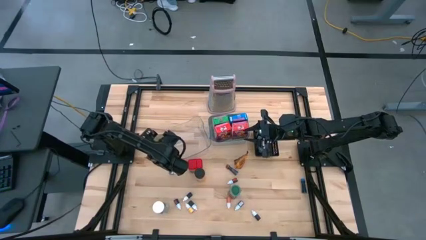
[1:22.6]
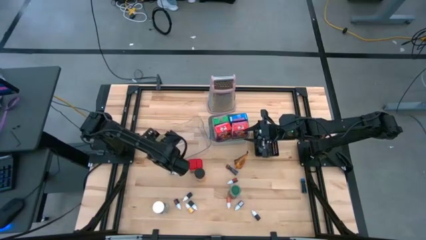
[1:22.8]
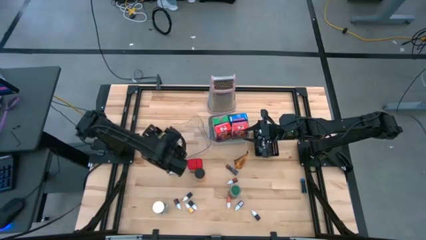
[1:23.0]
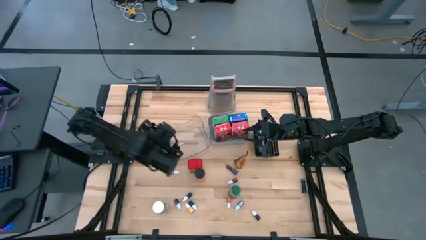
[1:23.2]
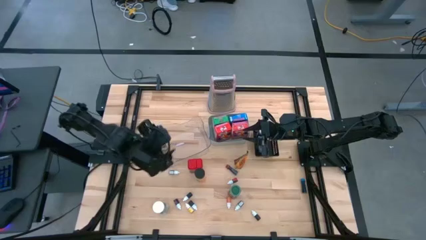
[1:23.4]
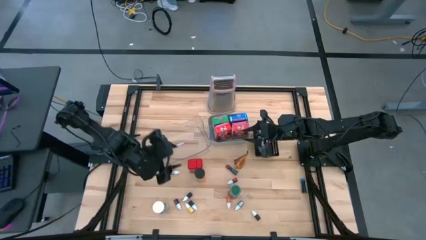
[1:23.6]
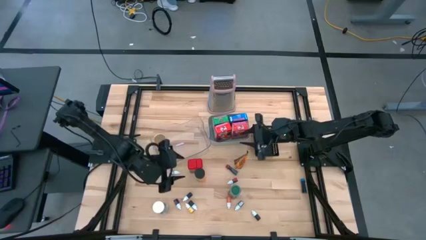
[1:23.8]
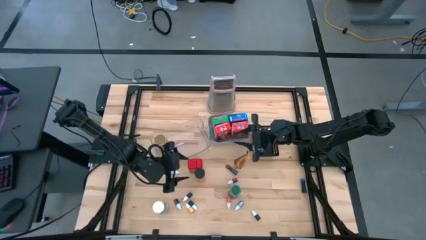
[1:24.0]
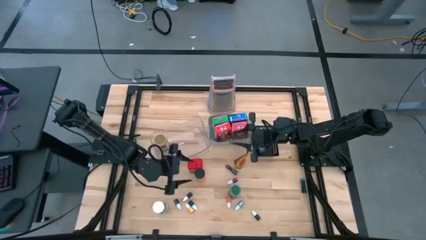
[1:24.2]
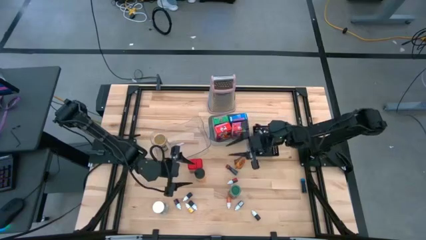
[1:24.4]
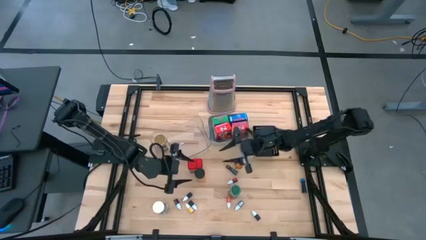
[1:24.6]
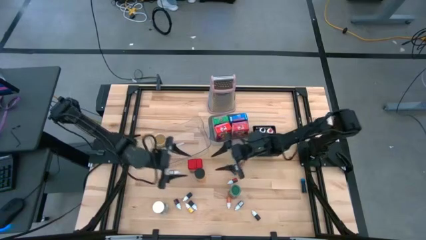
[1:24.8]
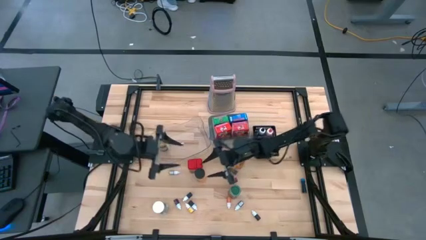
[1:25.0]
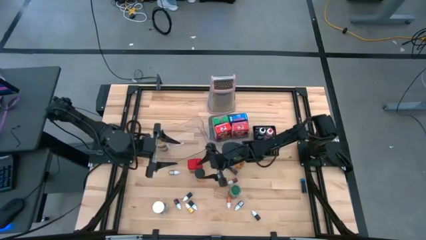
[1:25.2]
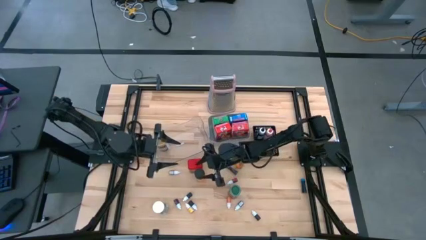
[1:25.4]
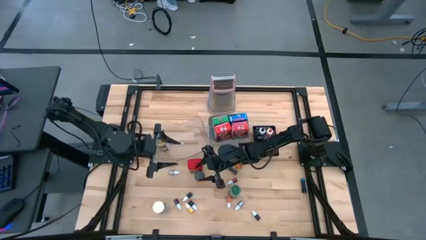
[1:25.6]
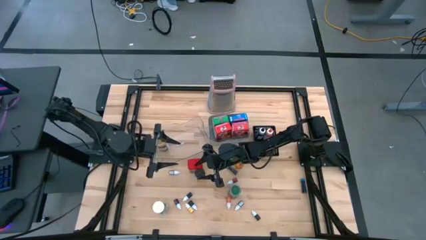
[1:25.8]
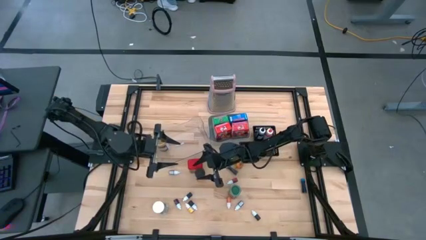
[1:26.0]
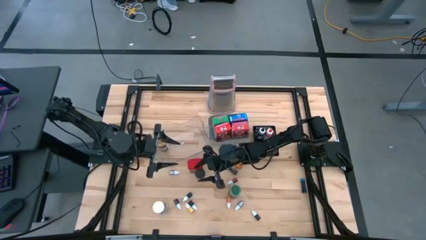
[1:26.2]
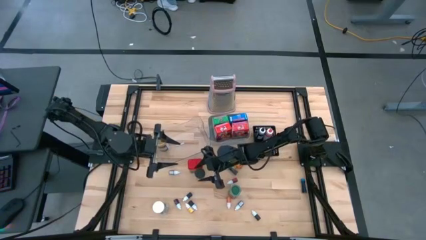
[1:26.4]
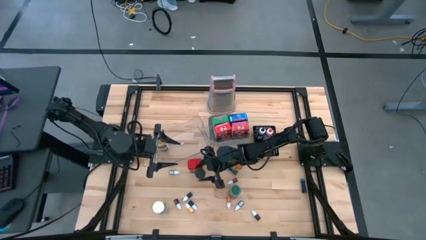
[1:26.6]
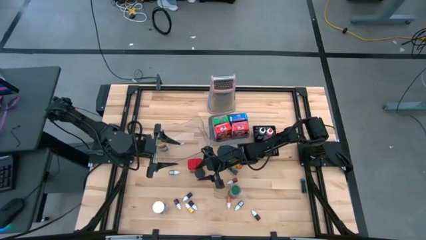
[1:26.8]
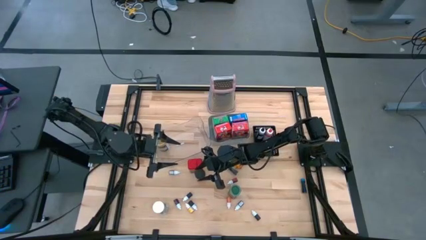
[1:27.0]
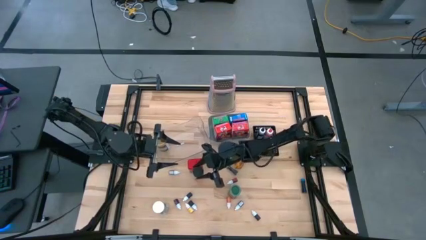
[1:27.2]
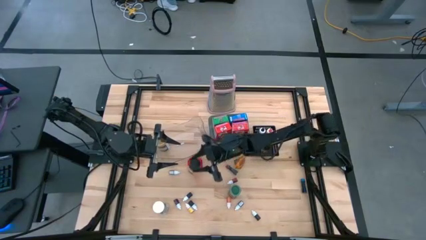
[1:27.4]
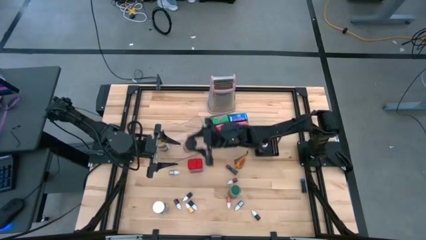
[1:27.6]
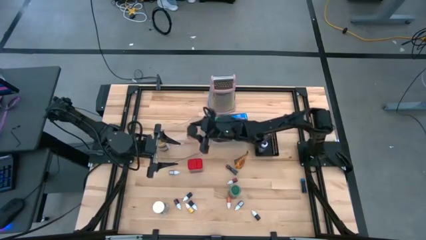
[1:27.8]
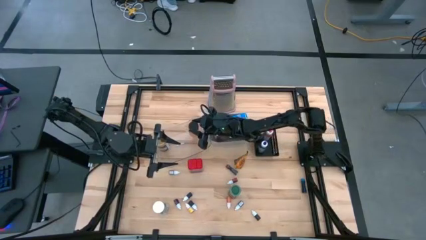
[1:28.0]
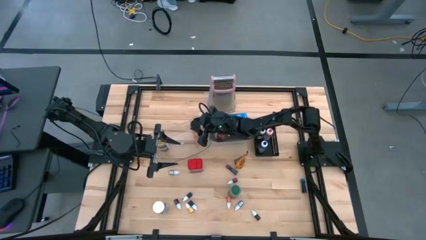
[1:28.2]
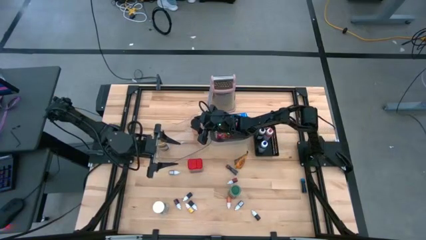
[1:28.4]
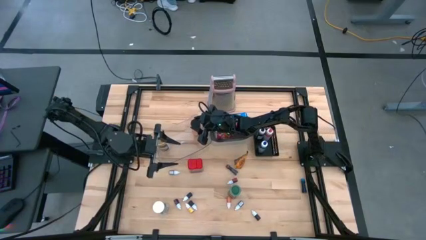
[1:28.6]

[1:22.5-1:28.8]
Task: Pick & Place Kitchen Items
Put the orange seasoning bottle into the transparent bin

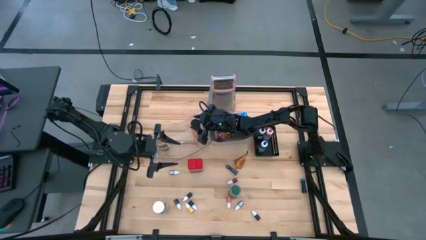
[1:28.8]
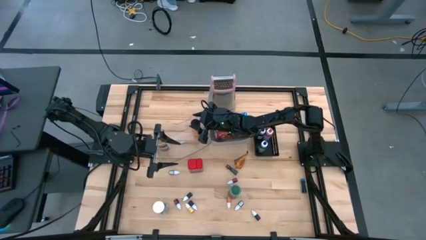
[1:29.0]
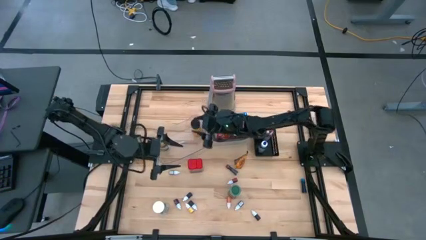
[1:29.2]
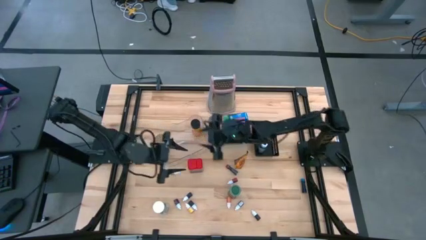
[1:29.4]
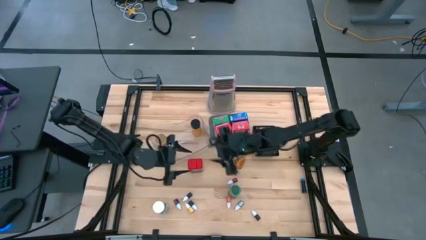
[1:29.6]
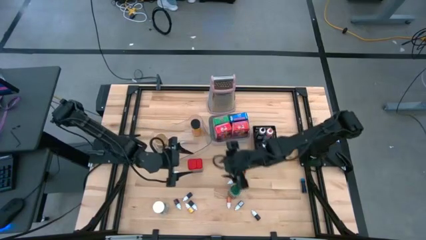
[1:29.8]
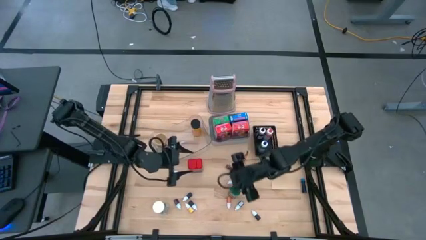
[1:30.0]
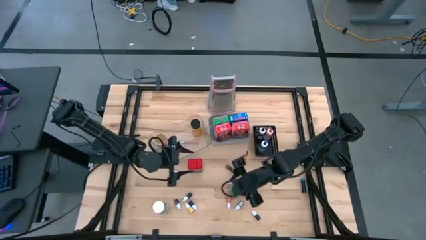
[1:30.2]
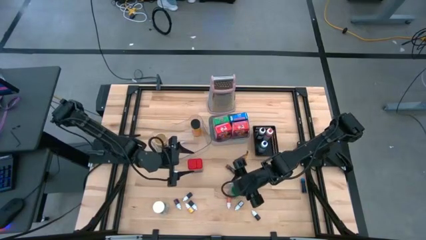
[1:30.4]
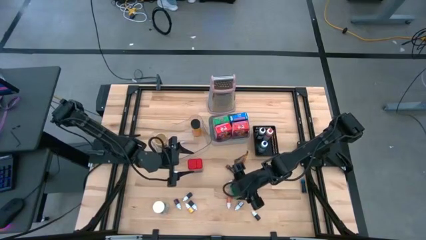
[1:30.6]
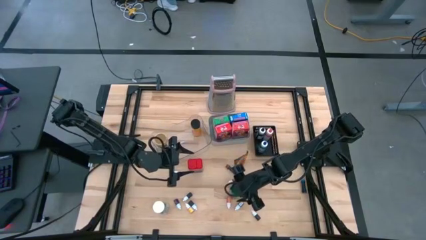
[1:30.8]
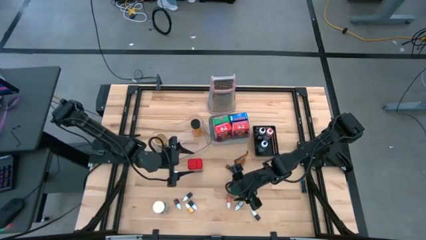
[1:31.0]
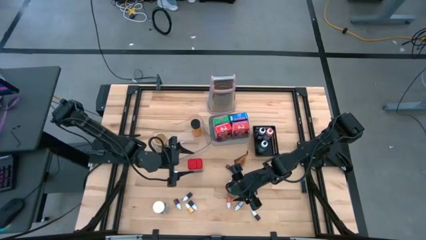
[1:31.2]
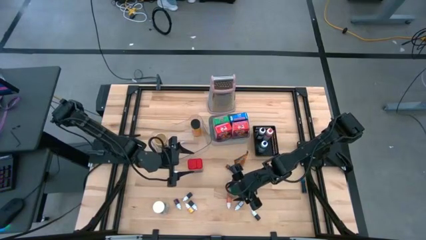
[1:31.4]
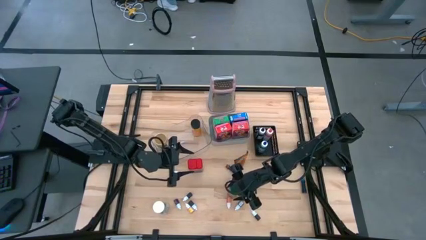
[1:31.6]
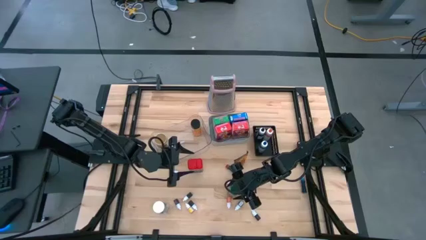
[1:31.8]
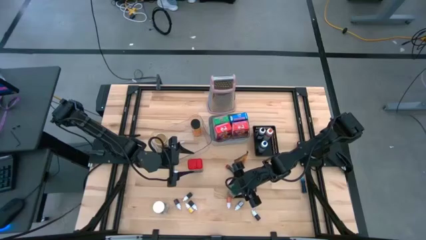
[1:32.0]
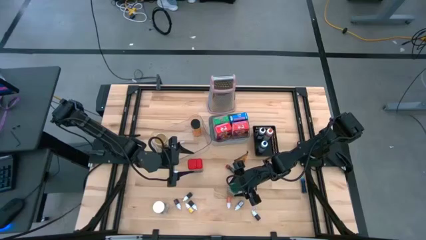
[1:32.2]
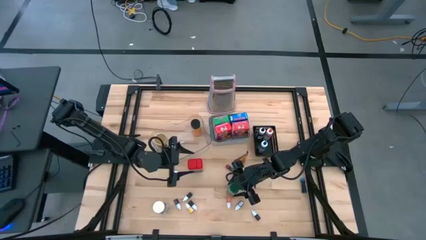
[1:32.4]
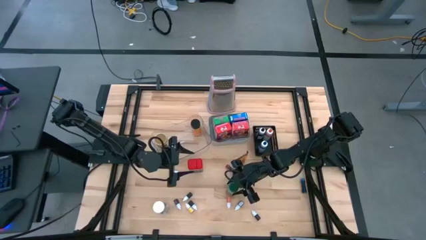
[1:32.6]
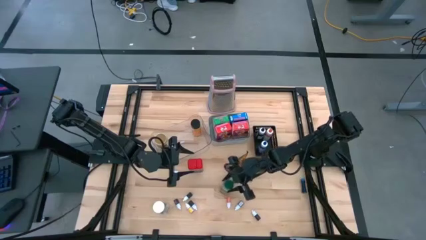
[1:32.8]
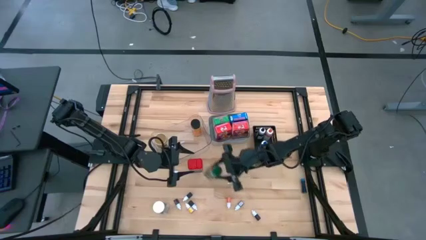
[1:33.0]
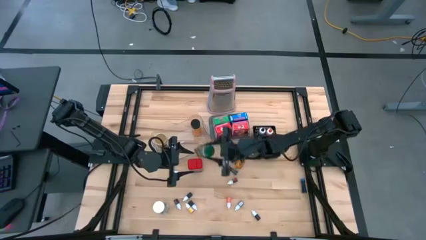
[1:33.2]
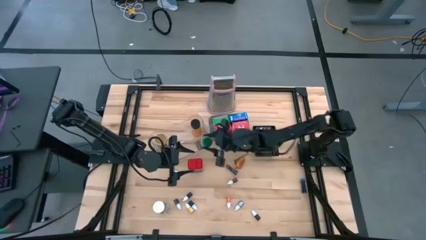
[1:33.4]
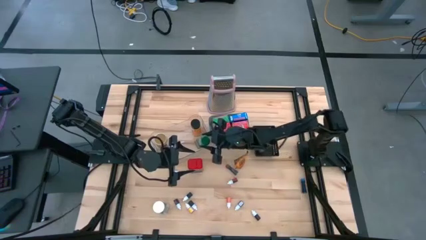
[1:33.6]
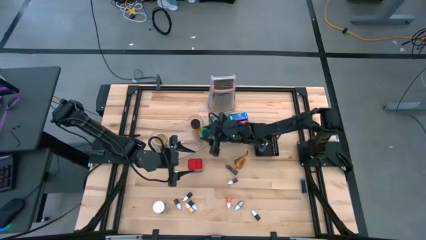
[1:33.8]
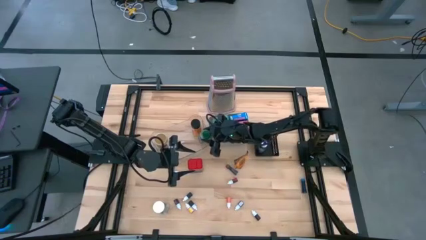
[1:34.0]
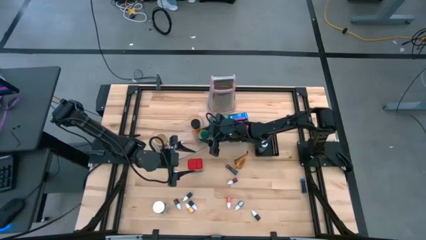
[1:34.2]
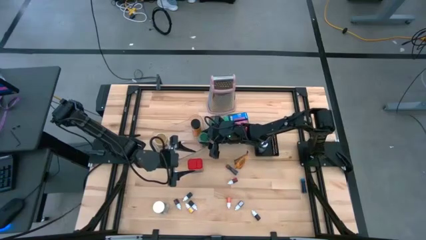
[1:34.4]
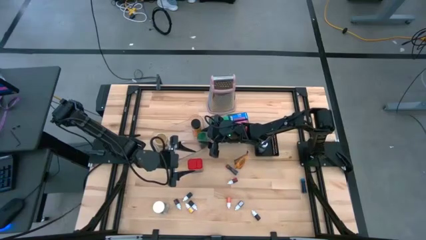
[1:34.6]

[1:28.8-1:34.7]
Put the green seasoning bottle into the transparent bin

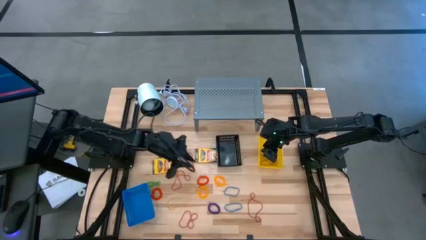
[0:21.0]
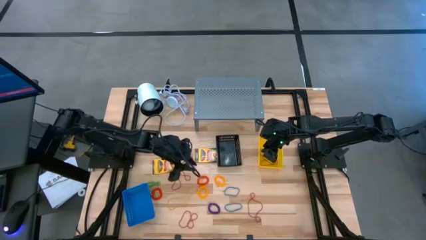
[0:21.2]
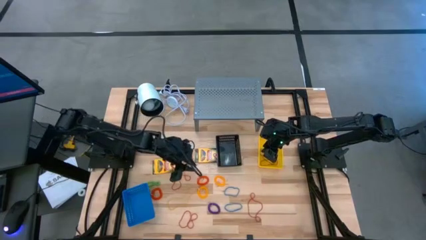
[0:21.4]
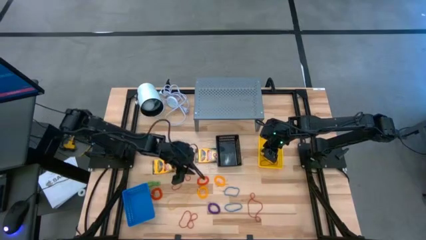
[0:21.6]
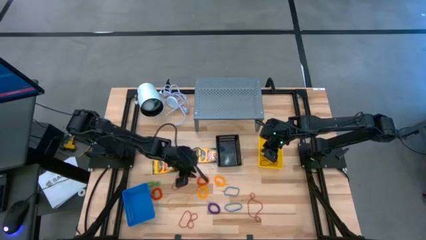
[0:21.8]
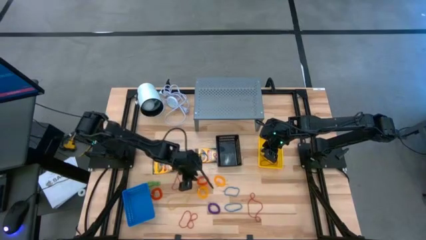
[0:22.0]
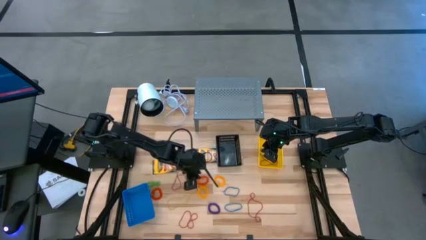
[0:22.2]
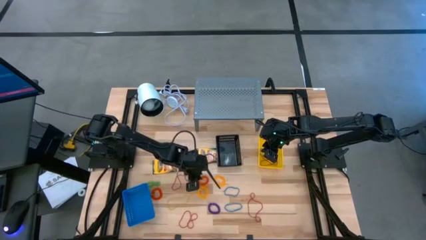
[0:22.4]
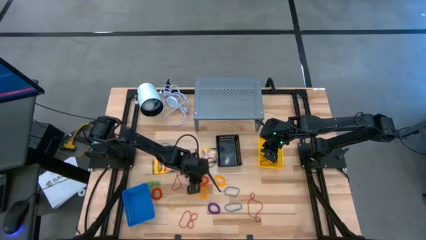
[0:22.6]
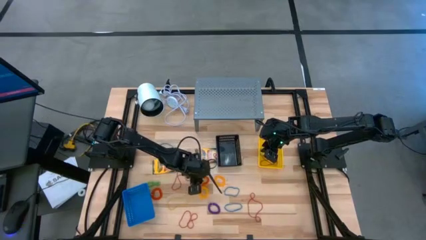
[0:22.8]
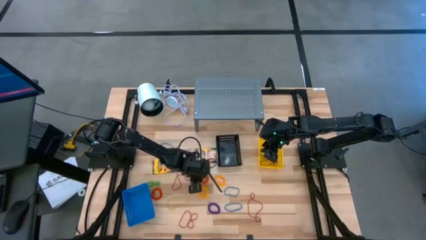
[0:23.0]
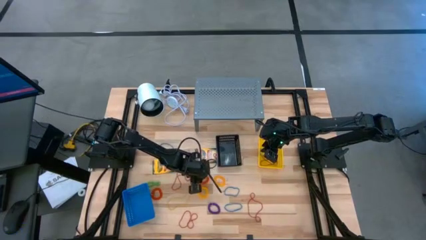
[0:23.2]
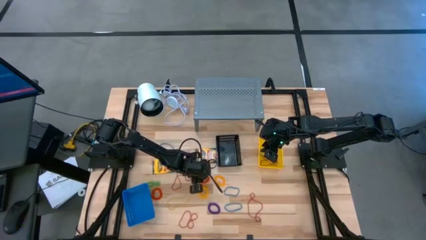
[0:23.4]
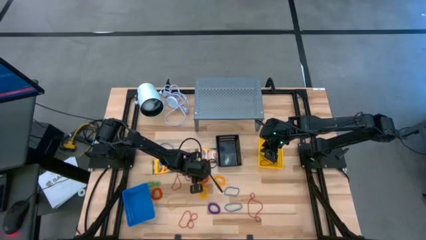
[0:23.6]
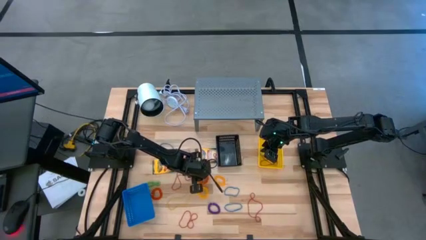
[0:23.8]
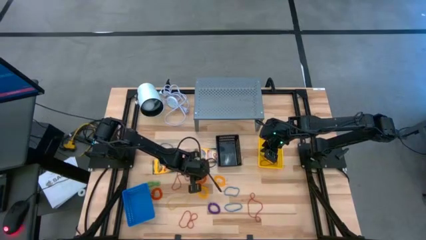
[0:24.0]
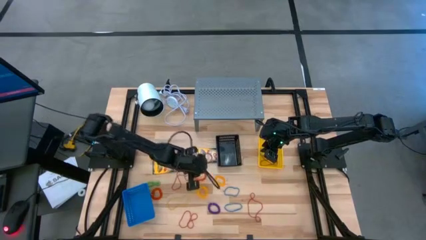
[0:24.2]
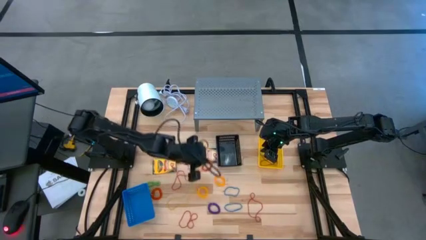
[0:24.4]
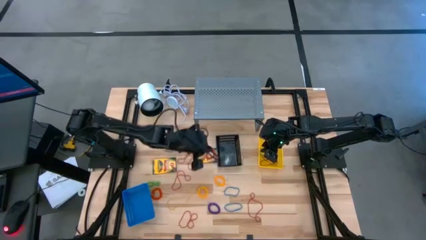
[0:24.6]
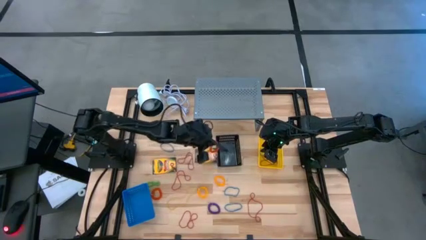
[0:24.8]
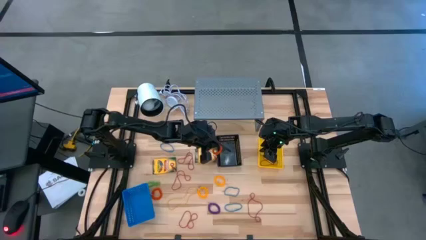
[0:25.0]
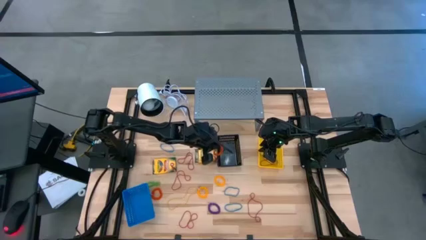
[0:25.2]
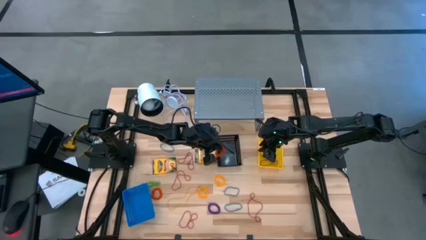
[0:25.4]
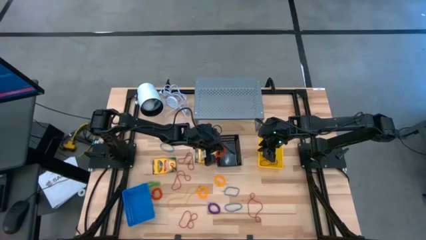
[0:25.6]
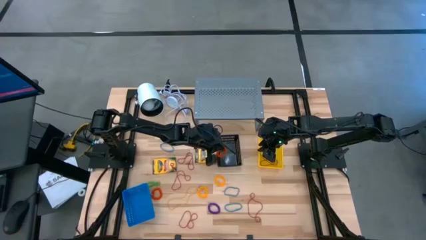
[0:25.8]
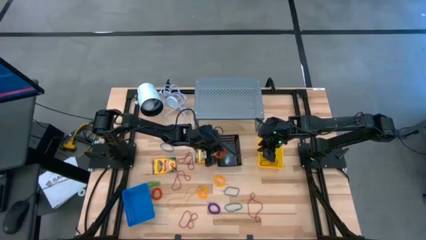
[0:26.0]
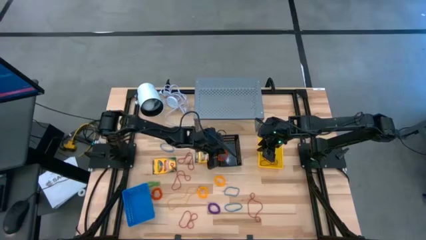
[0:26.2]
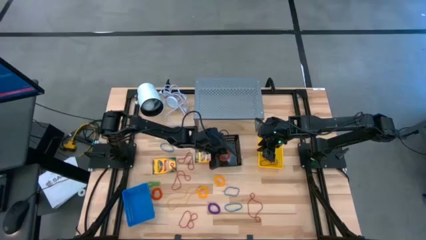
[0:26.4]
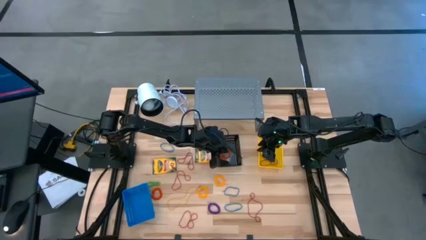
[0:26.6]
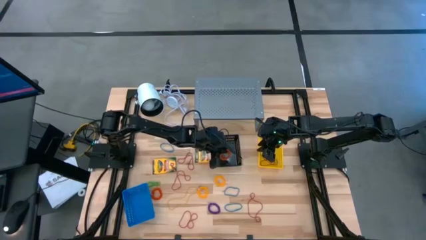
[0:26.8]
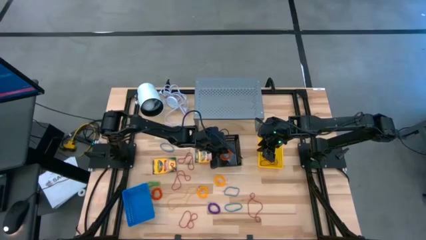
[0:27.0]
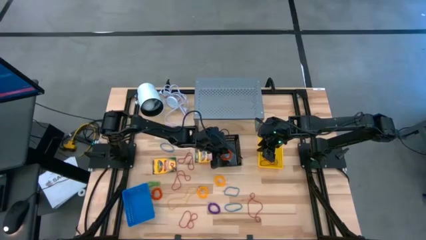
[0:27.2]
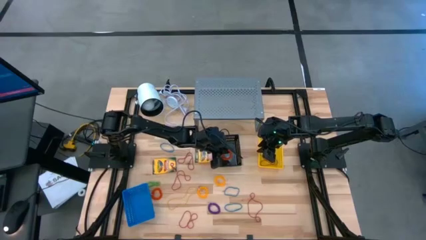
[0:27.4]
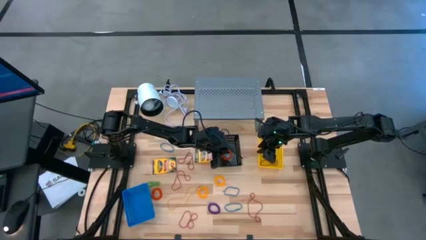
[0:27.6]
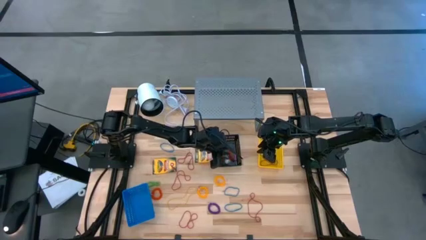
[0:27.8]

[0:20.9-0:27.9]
Task: Pick & Place Office Desk Supplies
Put the orange spring keychain into the black basket
